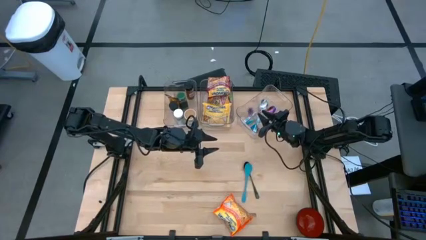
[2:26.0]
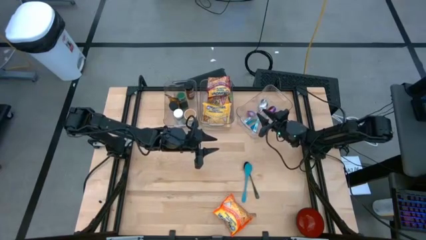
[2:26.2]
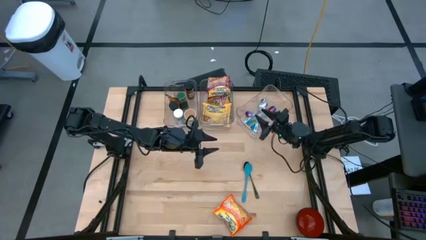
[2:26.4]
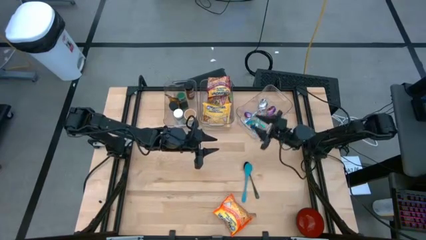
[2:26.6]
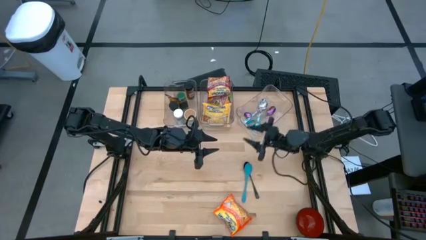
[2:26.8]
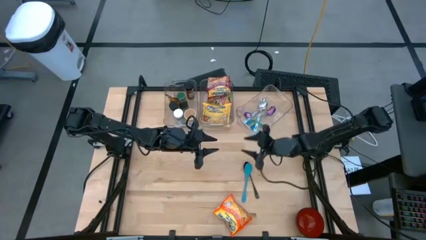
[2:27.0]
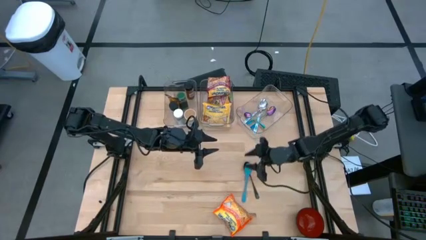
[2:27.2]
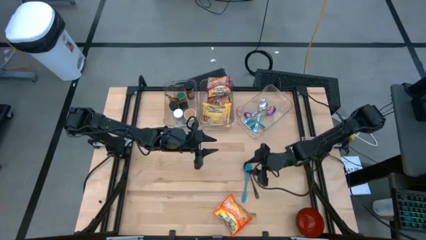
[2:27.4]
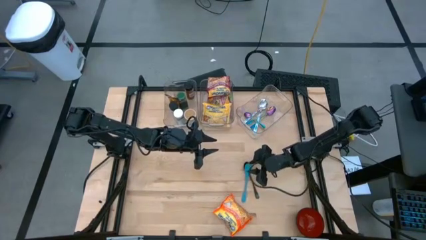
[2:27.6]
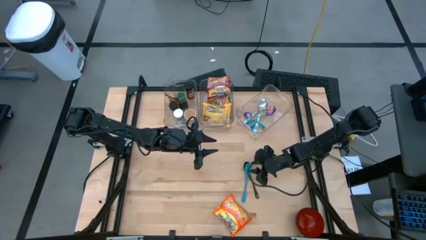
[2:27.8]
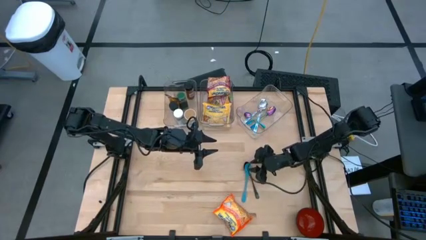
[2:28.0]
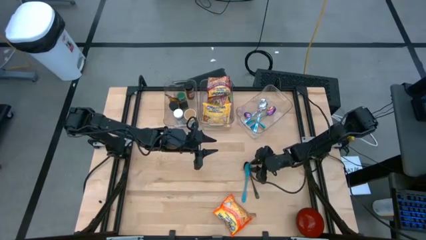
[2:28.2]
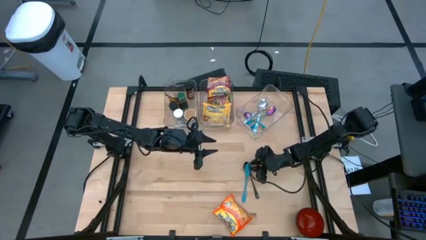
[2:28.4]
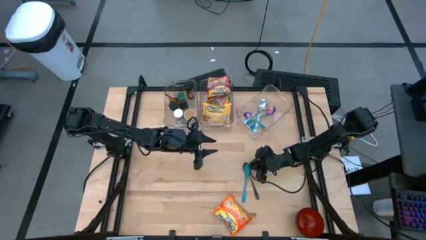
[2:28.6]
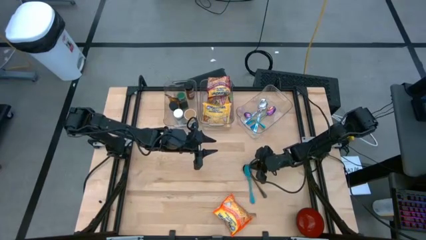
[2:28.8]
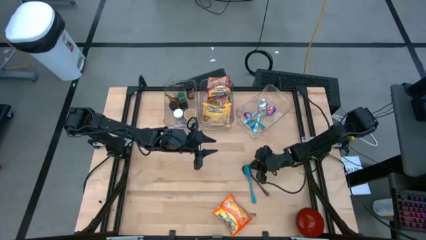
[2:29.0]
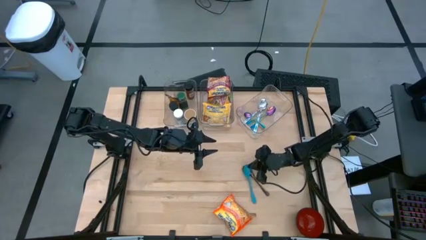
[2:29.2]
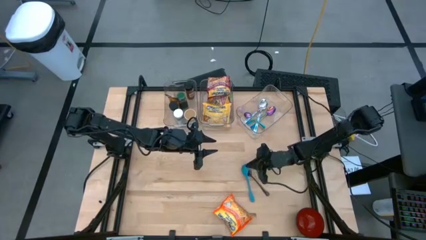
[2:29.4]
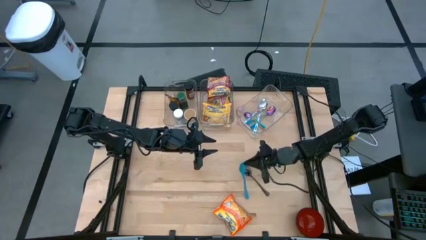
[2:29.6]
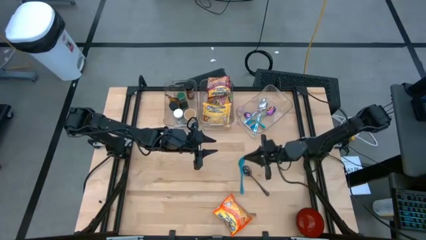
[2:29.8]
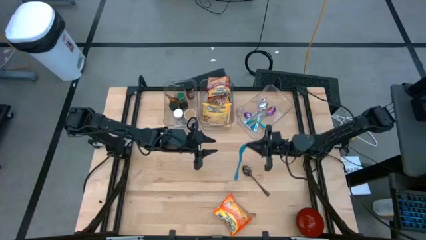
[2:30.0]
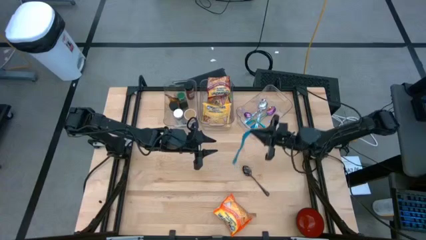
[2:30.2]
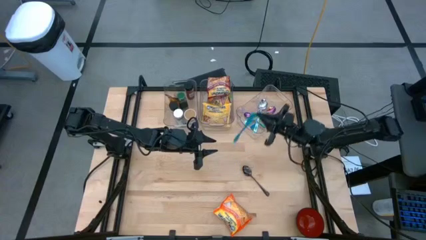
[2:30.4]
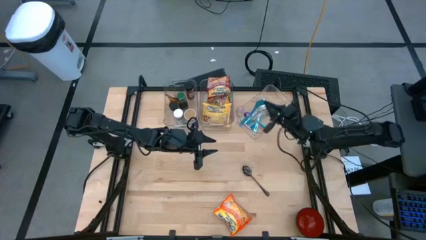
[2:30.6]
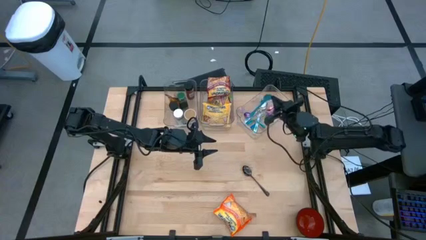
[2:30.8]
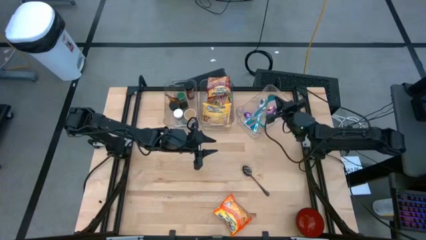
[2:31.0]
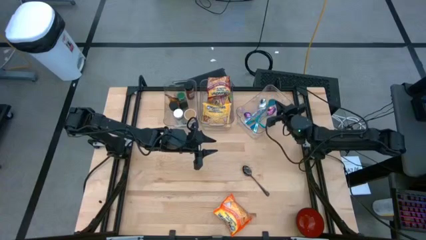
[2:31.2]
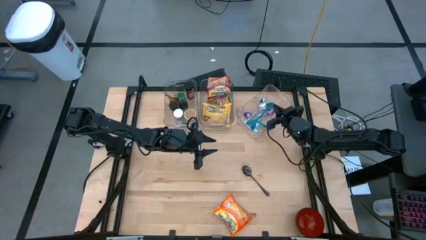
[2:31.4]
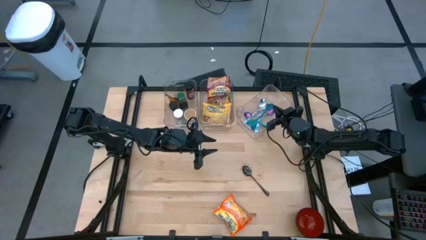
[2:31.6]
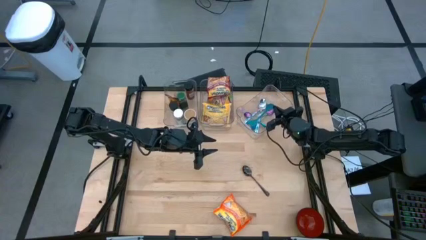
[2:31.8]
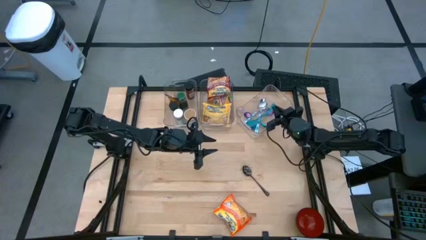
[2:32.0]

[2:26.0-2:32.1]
Task: Pick & Place Food Item
Put the light blue spoon into the right transparent bin

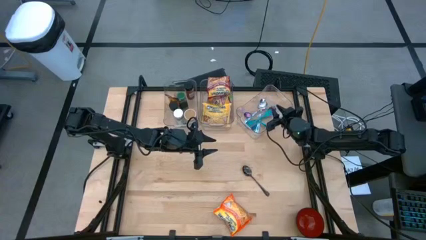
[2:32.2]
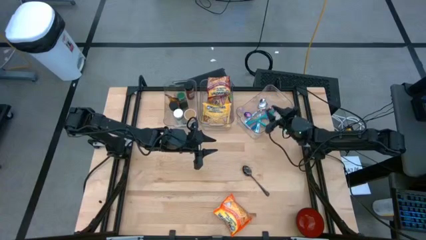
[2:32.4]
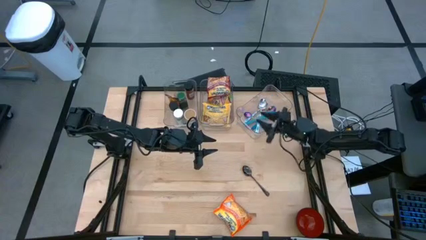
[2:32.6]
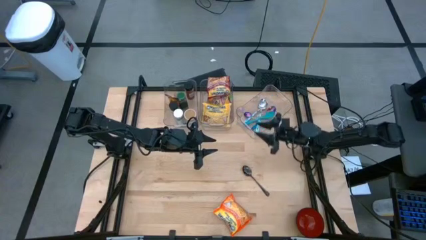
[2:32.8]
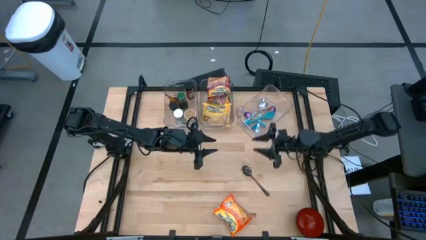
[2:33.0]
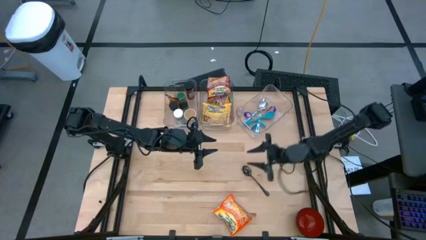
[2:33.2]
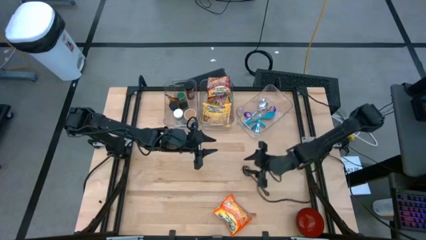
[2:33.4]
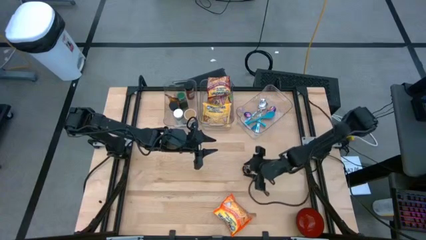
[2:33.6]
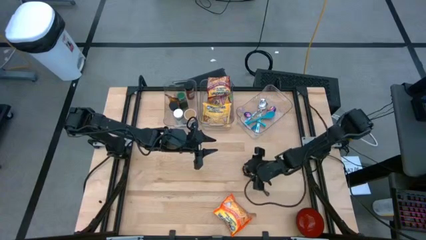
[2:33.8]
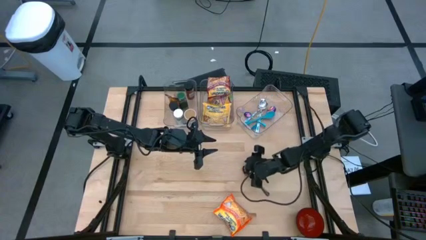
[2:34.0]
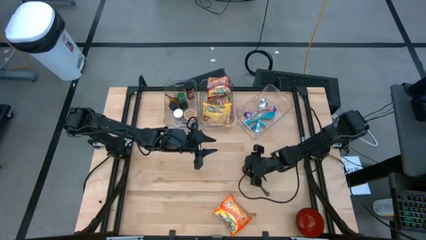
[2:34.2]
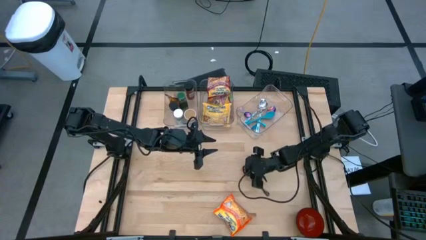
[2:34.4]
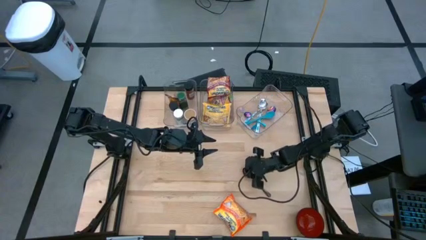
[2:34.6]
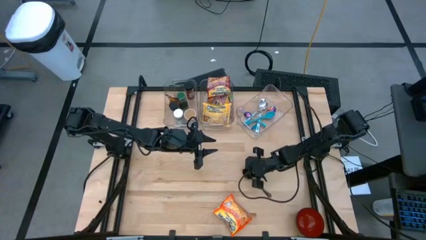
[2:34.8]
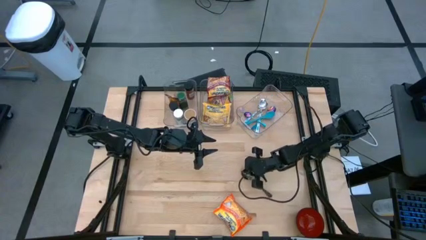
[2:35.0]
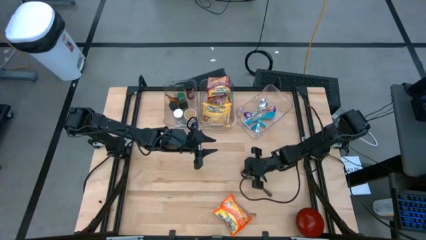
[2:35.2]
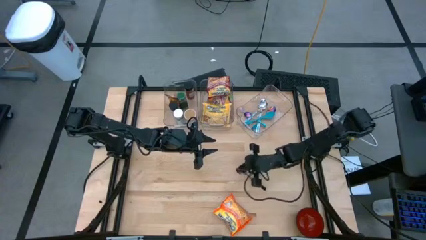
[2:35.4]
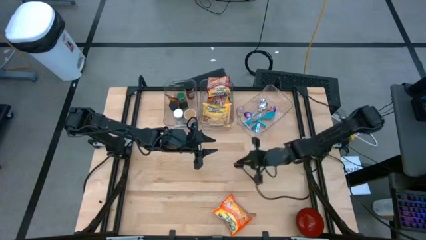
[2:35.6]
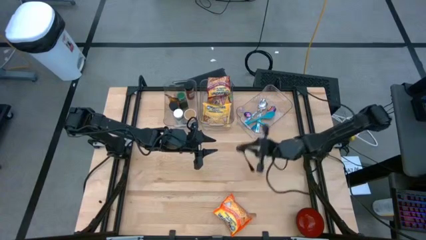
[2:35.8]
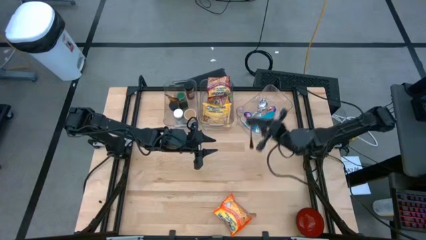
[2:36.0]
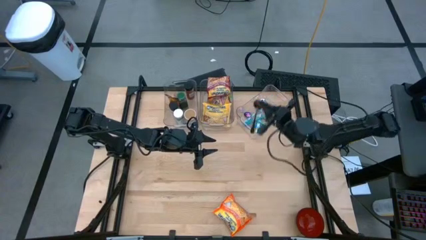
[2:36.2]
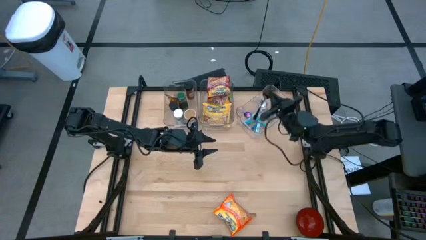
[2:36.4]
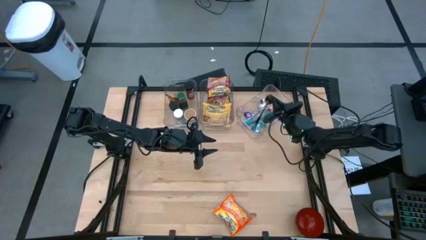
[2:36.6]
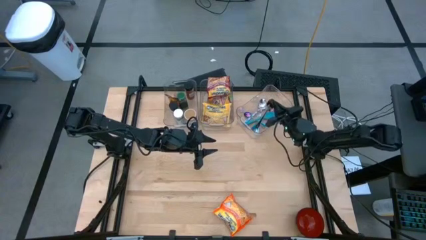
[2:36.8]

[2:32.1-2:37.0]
Put the black spoon into the right transparent bin

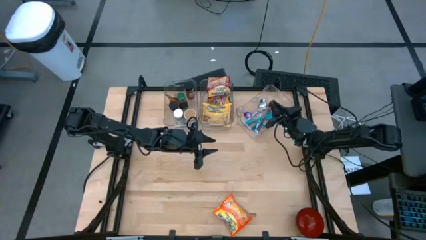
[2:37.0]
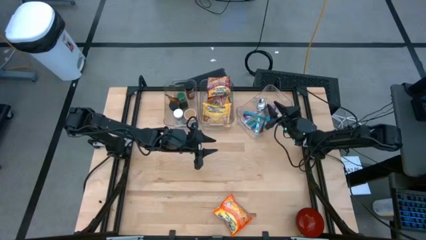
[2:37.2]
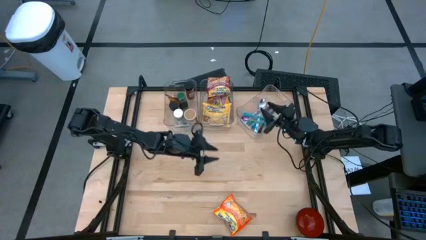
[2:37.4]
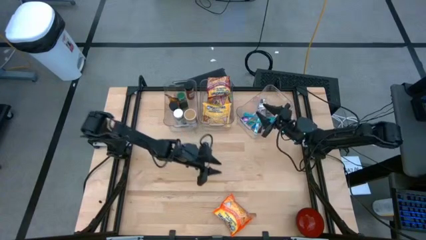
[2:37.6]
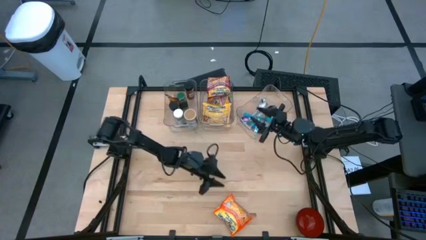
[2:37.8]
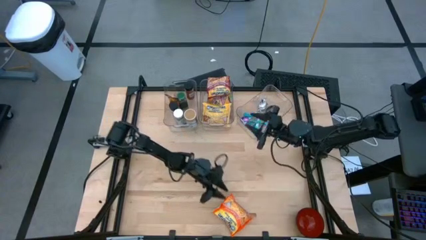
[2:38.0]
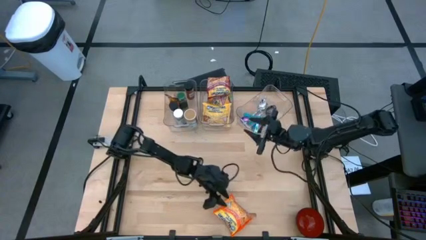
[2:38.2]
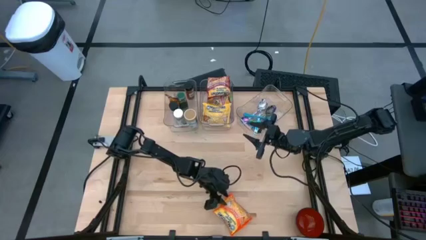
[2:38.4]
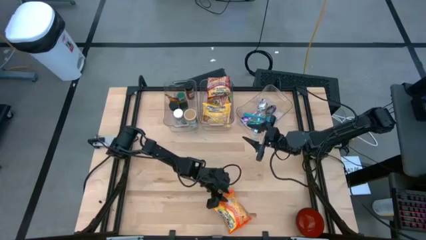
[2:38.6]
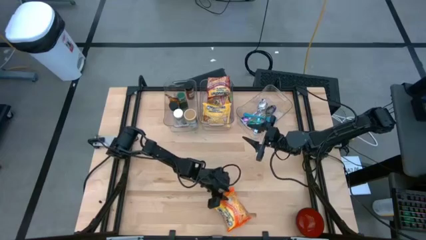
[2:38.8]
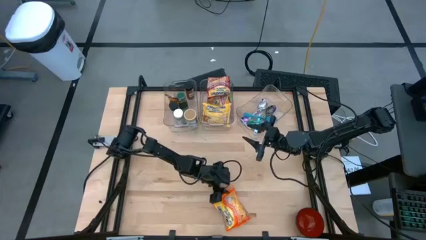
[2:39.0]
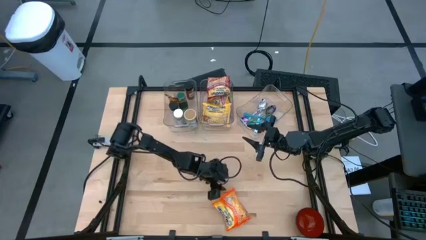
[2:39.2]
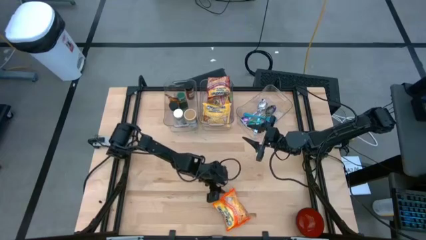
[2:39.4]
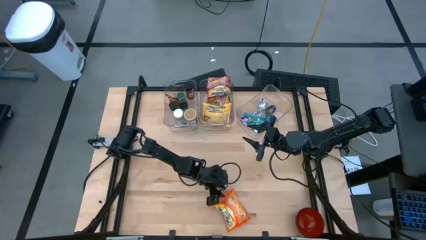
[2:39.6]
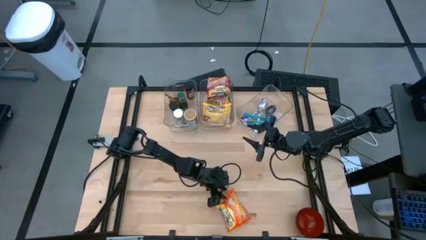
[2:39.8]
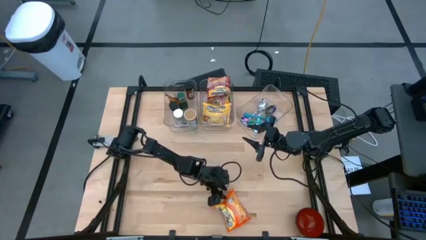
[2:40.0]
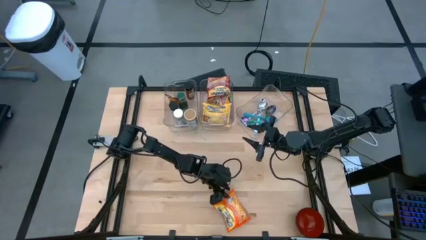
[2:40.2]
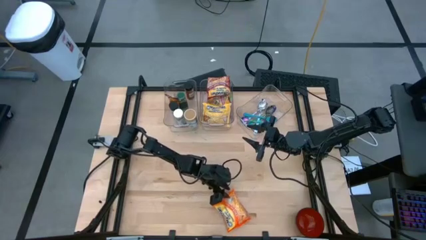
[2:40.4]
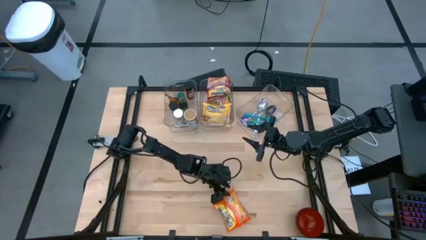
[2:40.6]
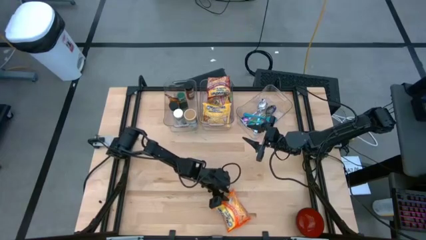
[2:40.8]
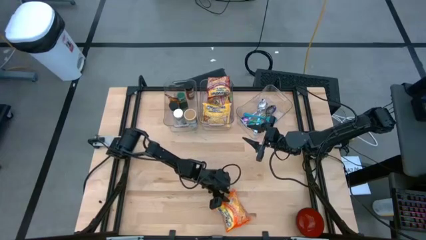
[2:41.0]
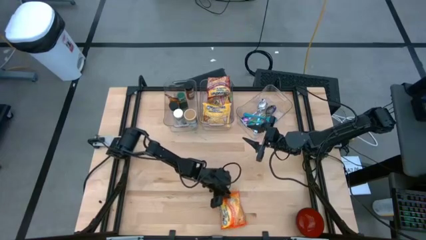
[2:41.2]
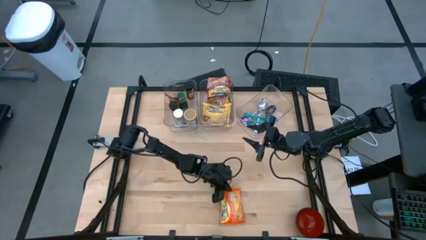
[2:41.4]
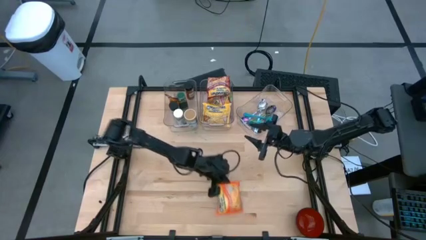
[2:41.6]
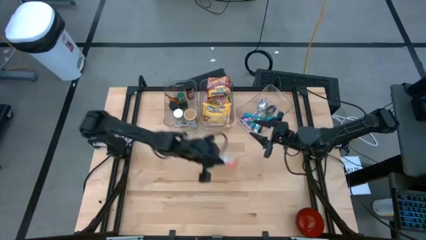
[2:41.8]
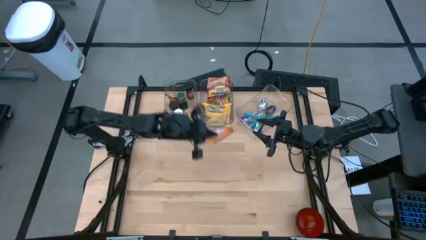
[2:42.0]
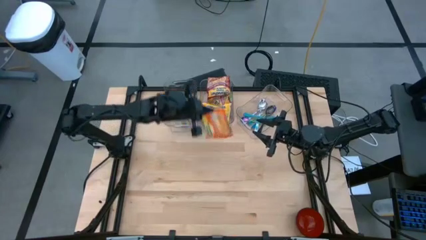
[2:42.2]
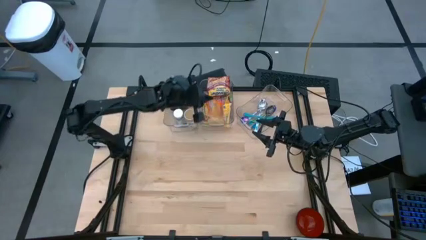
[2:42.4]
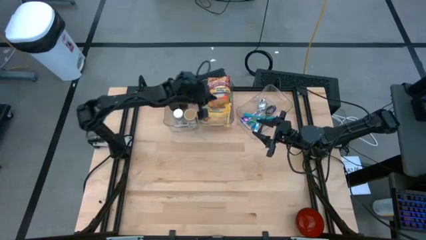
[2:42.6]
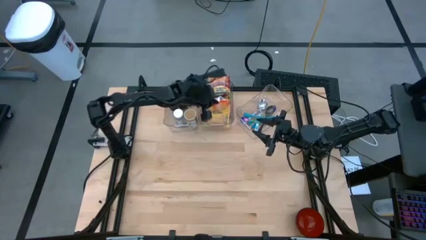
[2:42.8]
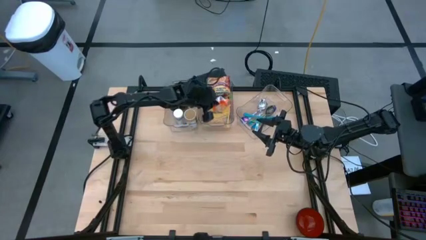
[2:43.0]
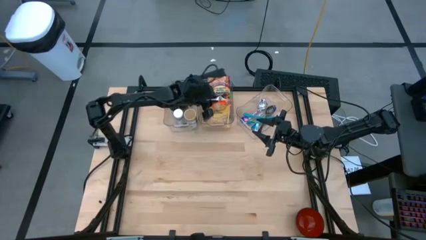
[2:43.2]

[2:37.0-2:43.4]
Put the orange noodle pack into the middle transparent bin
